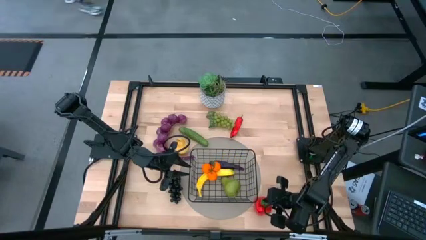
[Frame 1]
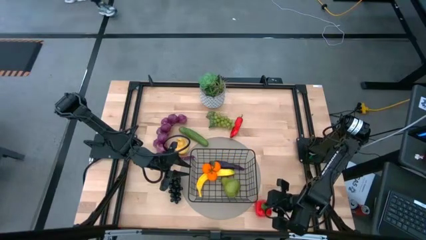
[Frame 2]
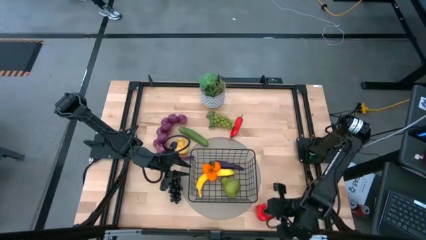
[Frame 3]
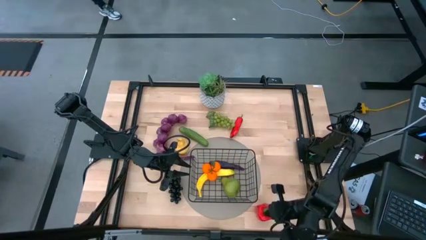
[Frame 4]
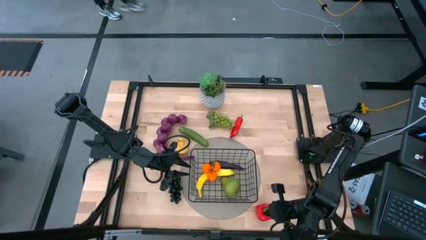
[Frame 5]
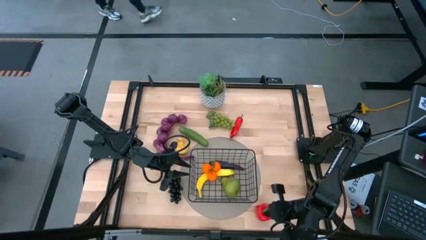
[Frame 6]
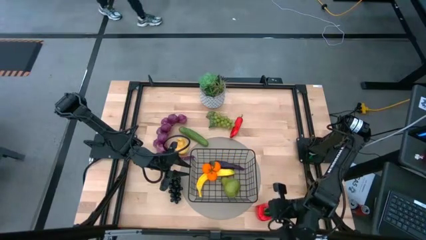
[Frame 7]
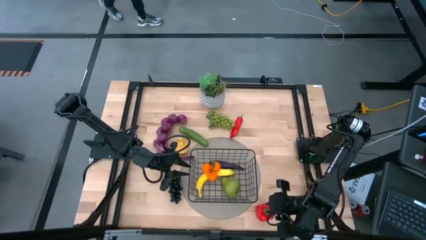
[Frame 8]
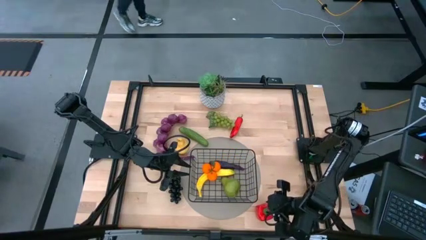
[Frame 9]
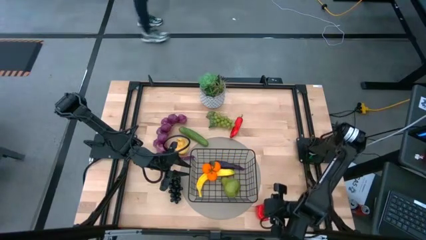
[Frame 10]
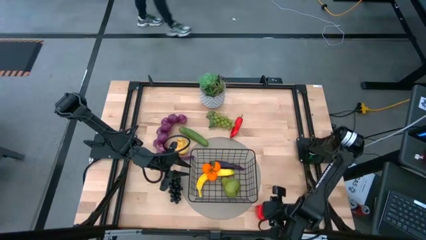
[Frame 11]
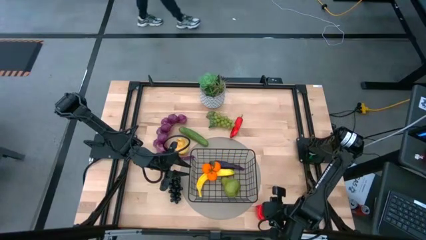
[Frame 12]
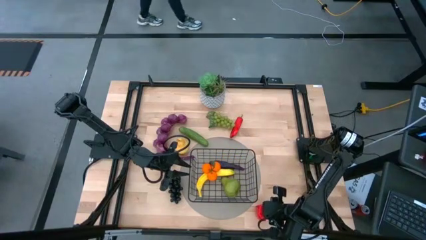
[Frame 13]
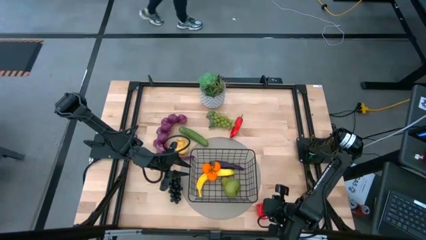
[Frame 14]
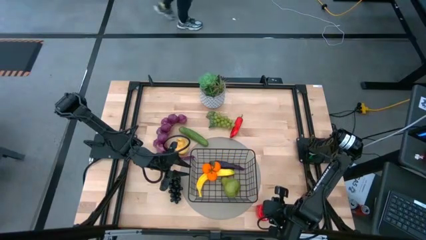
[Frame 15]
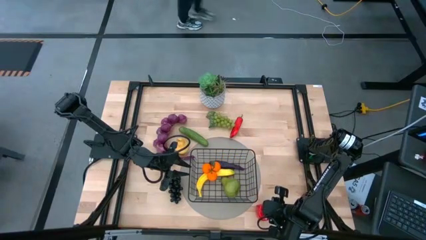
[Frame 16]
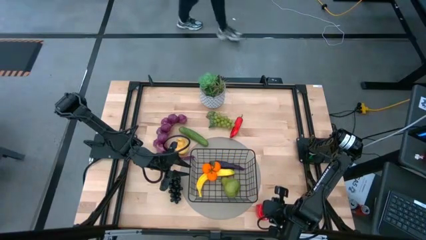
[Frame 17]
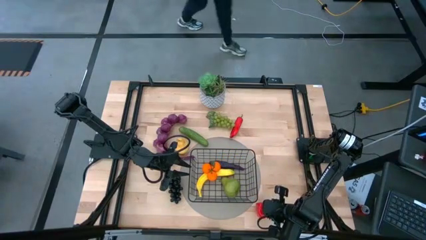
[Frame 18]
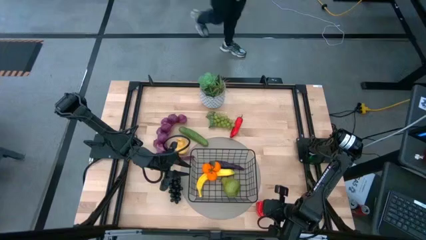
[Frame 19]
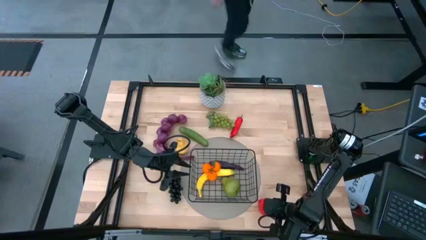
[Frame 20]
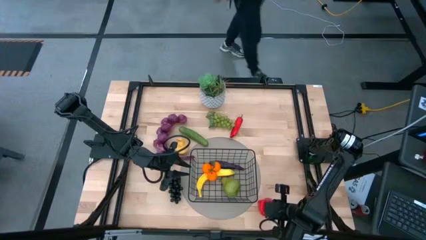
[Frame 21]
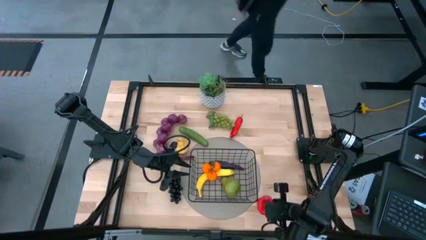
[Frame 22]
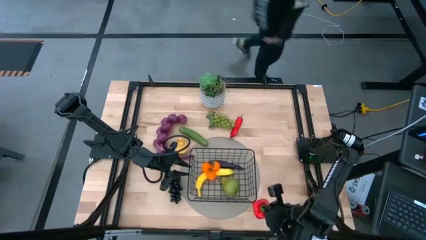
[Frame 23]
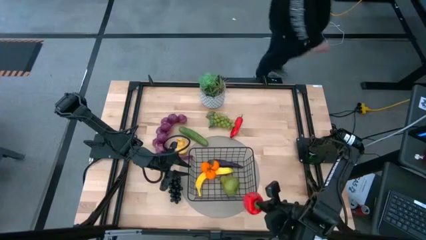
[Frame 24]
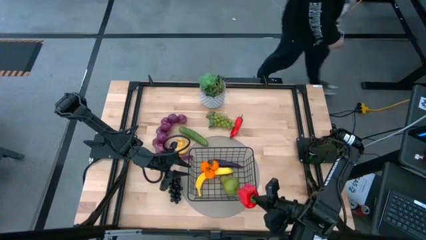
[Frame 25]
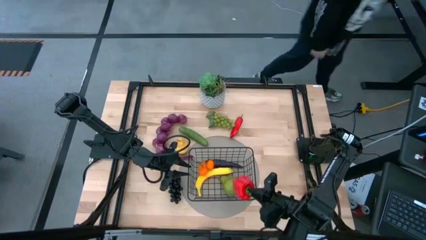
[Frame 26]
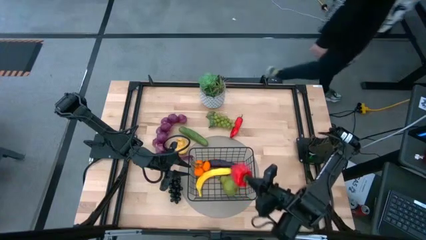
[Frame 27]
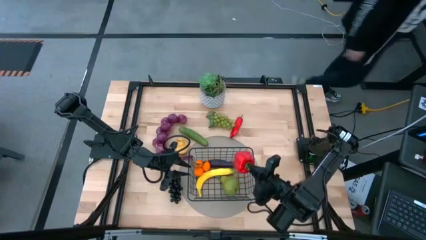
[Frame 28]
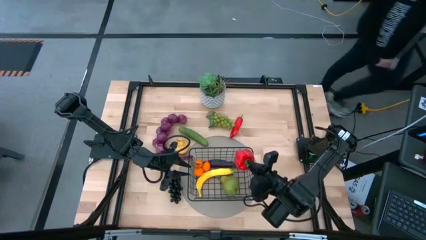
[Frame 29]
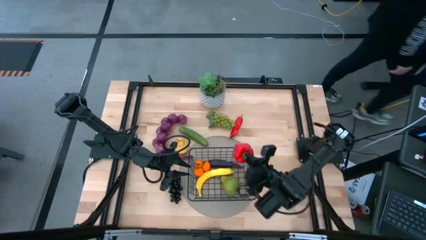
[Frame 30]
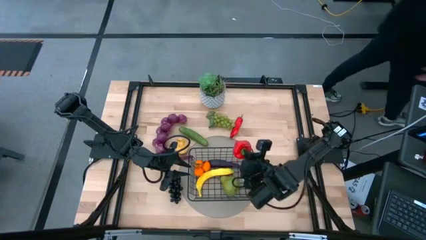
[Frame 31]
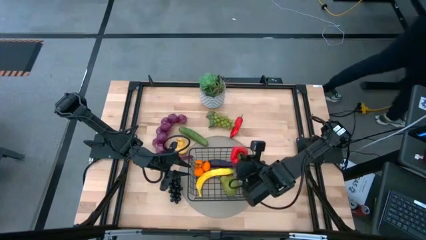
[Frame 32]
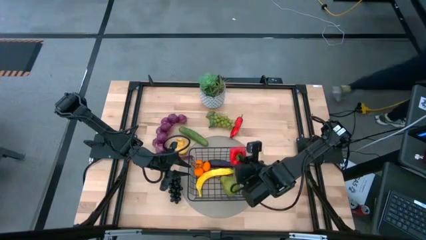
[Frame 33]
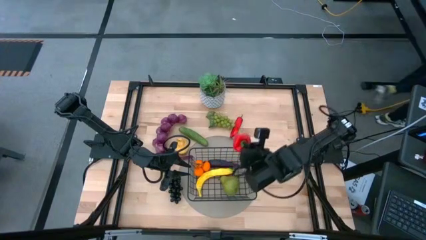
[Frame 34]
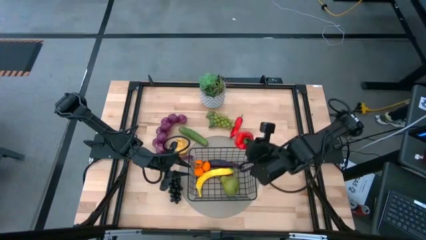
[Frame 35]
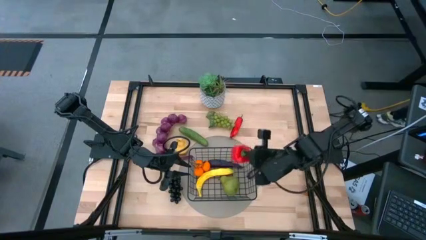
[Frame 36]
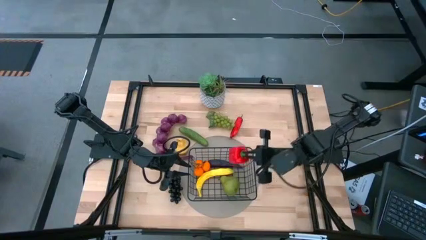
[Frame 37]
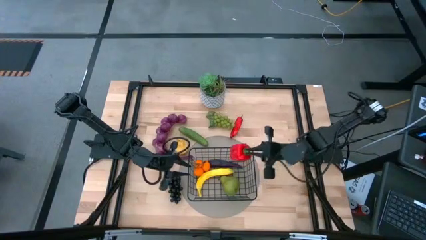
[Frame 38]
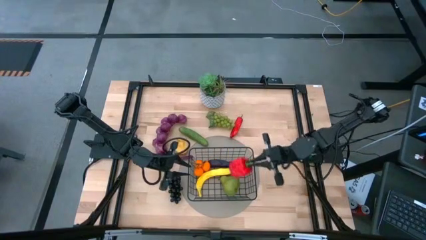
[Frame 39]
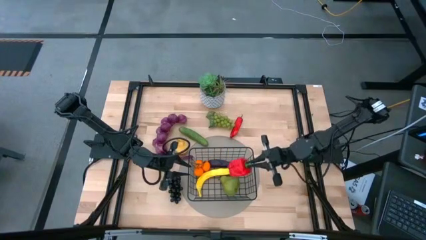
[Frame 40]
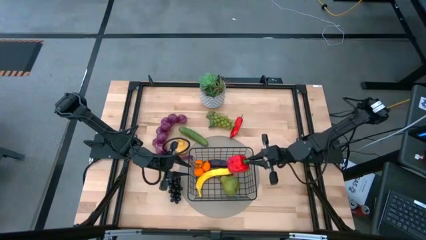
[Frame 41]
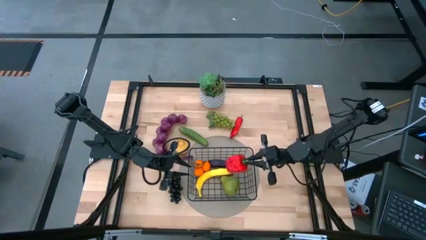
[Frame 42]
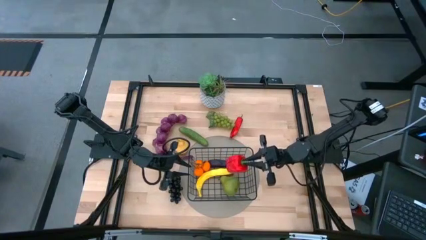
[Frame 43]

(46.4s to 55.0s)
Task: Build produce basket
Put the red bell pepper into the black wire basket

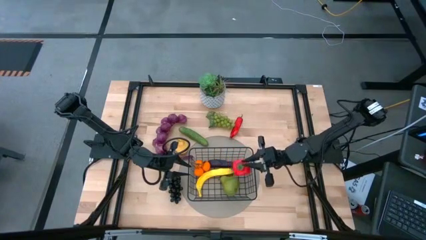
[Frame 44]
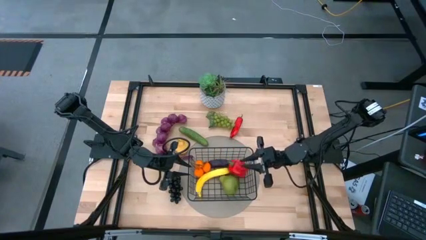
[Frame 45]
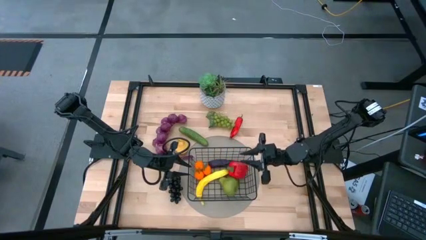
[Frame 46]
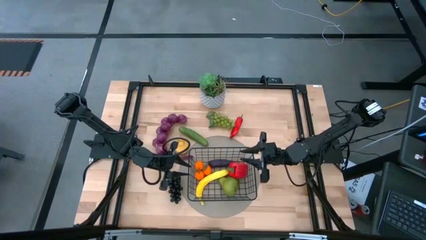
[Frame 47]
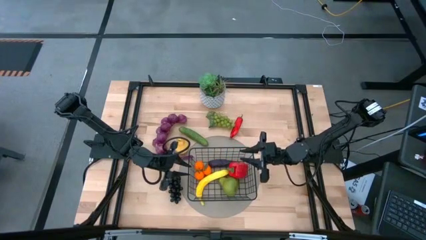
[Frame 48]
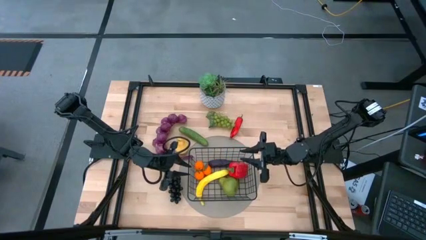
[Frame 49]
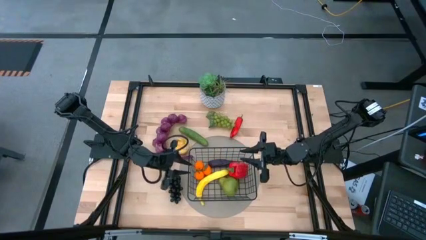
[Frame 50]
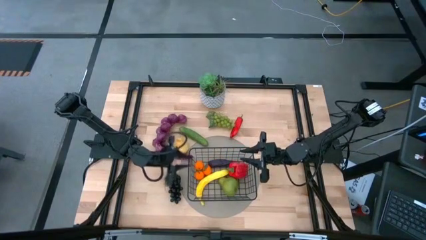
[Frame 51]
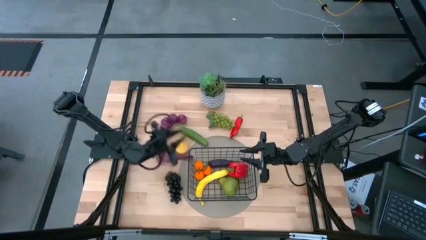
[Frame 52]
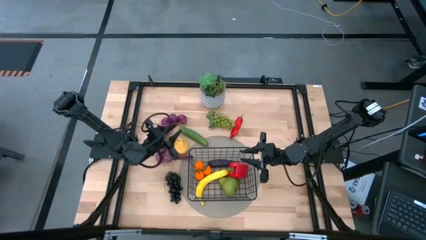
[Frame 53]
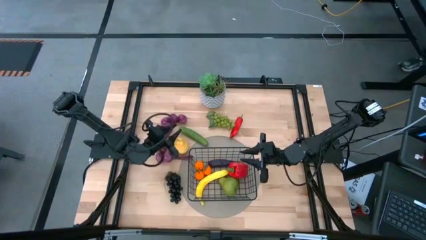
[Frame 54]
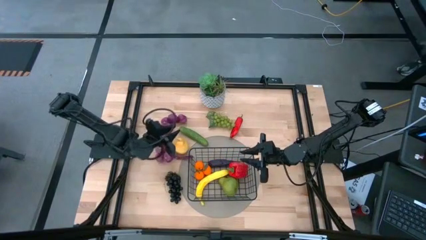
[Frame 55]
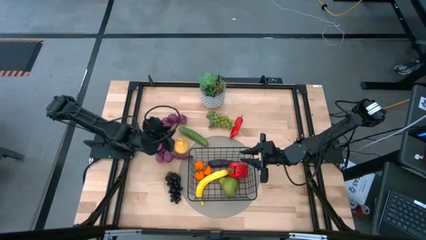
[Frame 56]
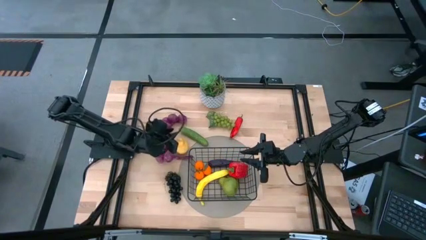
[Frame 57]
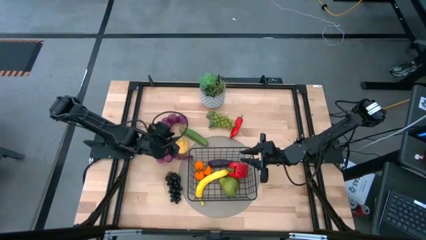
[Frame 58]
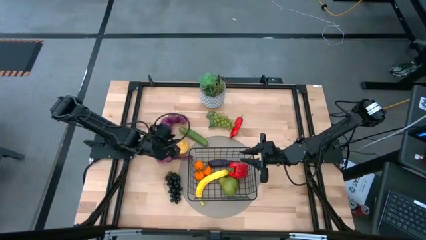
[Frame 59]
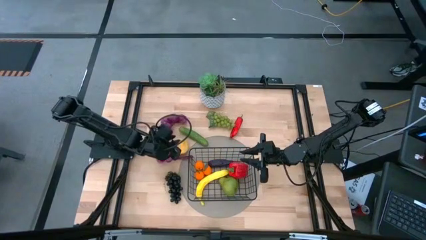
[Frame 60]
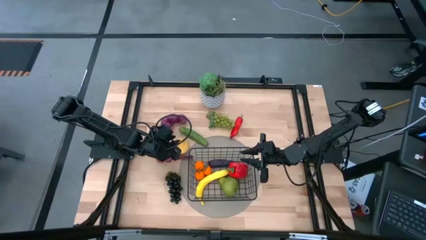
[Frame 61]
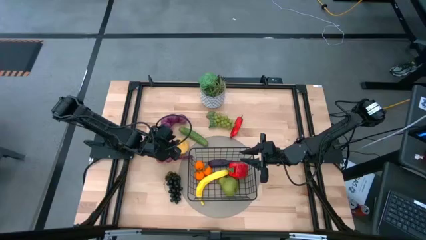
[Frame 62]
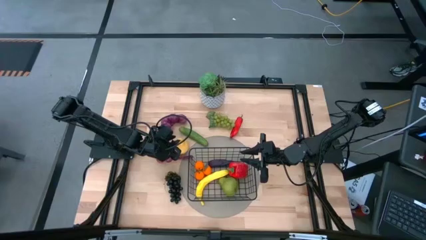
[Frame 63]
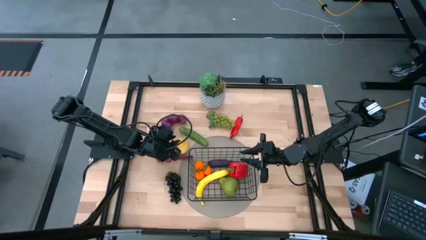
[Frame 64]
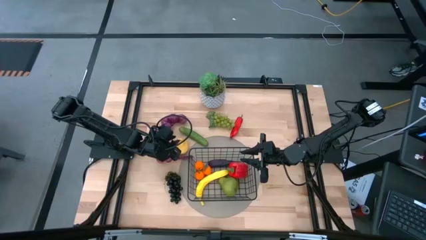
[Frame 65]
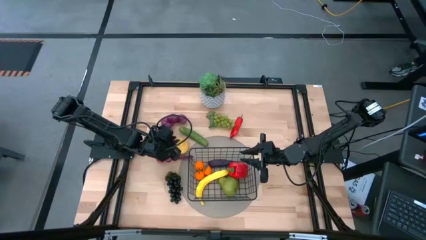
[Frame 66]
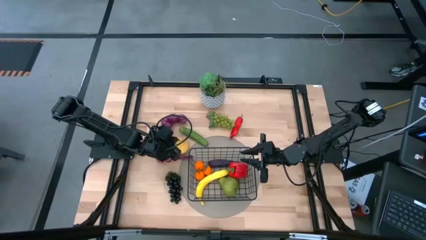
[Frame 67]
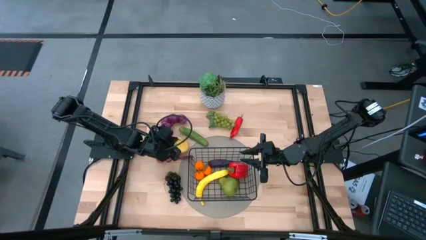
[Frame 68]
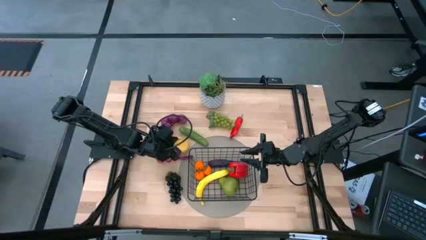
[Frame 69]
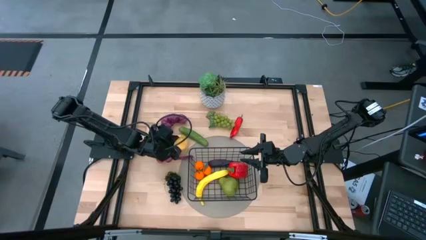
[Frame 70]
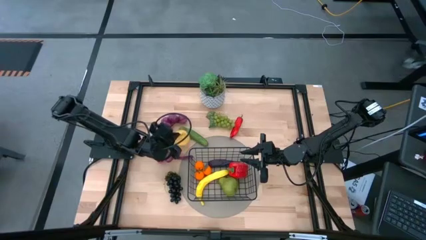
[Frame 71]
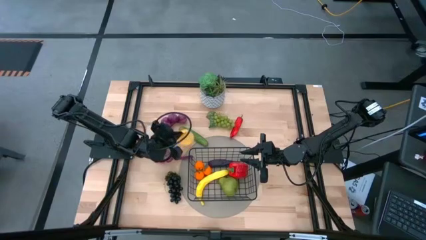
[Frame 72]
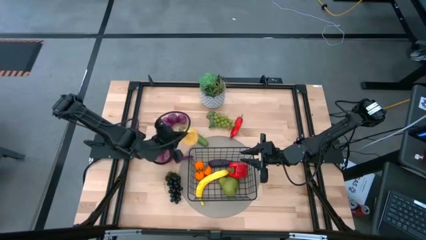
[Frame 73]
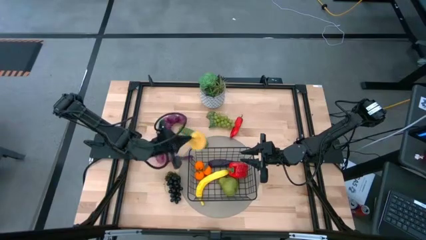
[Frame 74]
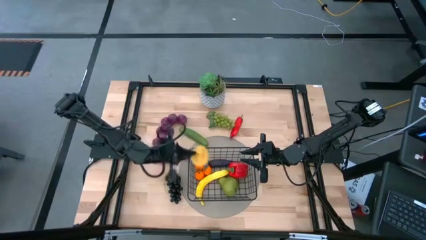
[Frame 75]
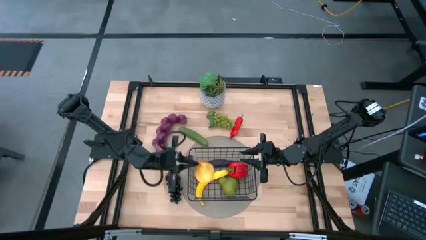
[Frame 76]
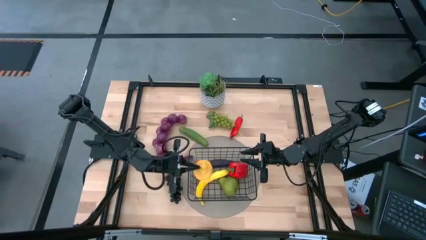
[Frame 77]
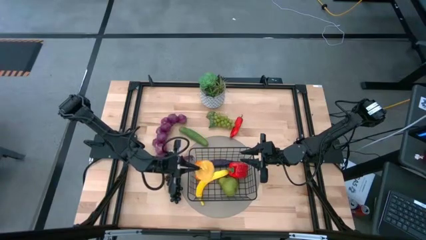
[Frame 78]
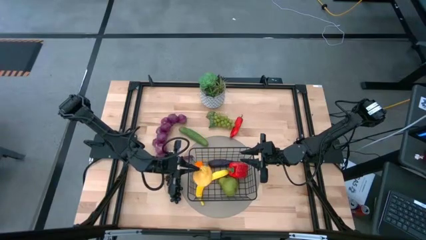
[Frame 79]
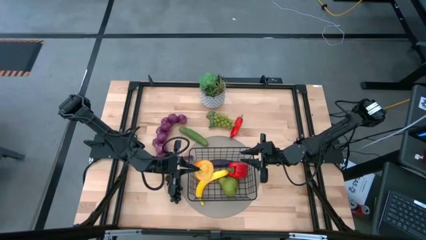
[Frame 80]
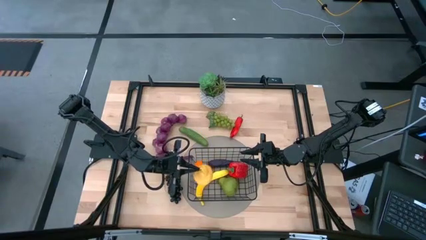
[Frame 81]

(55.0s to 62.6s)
Put the yellow pear into the black wire basket
